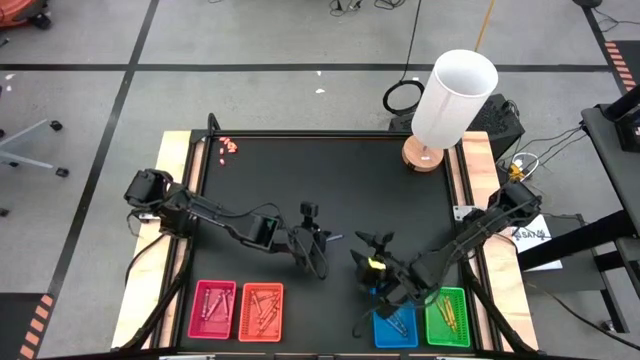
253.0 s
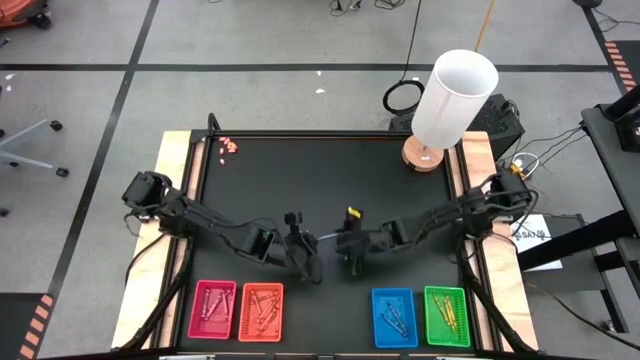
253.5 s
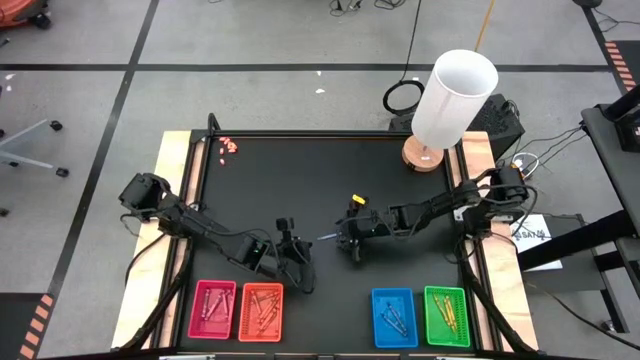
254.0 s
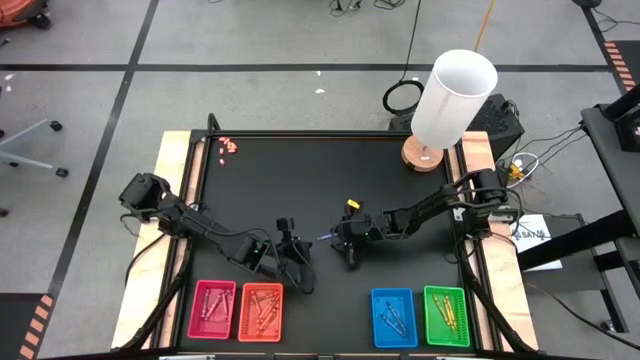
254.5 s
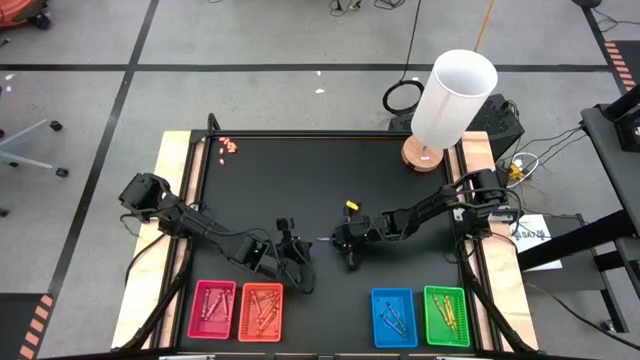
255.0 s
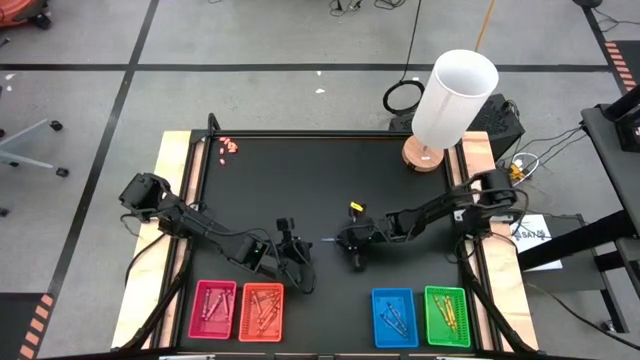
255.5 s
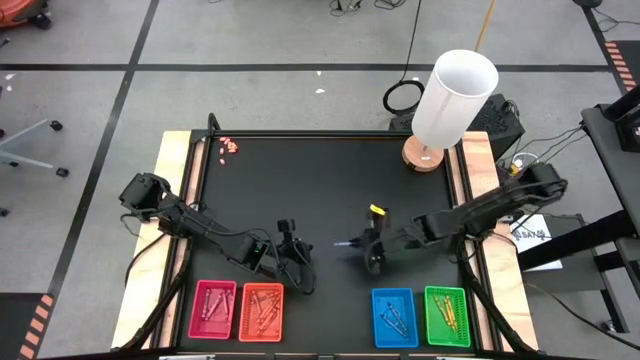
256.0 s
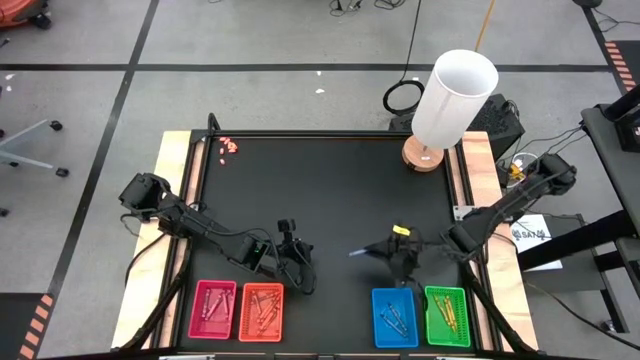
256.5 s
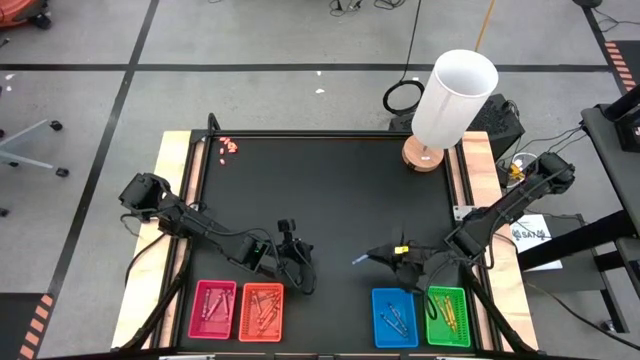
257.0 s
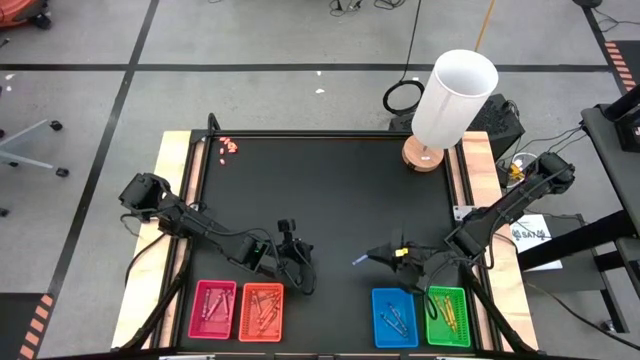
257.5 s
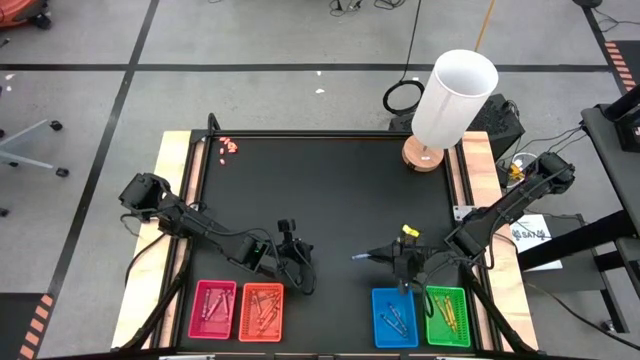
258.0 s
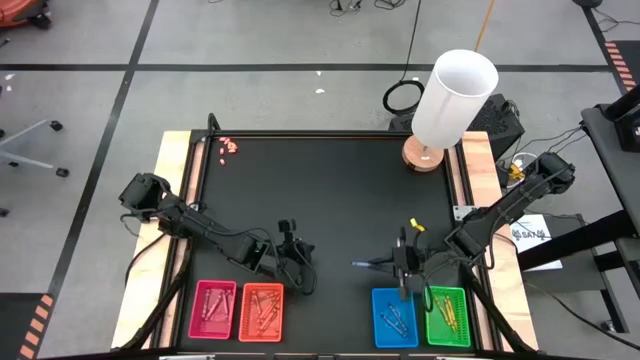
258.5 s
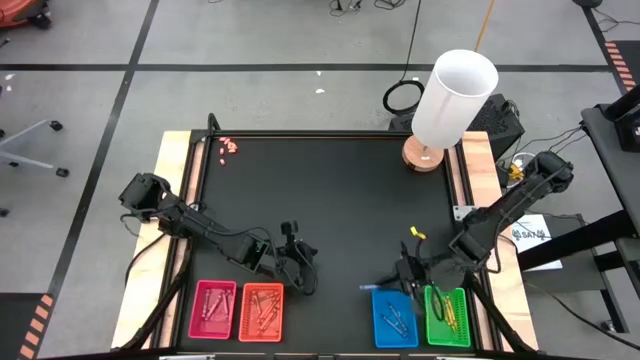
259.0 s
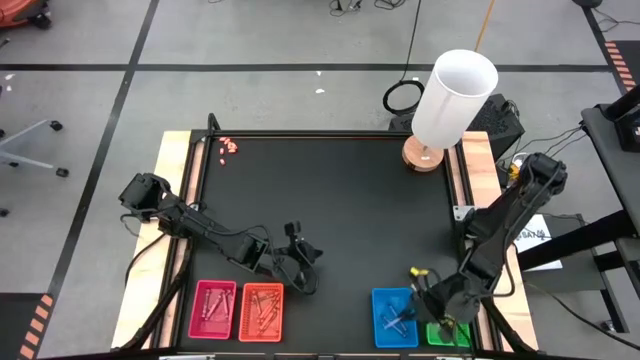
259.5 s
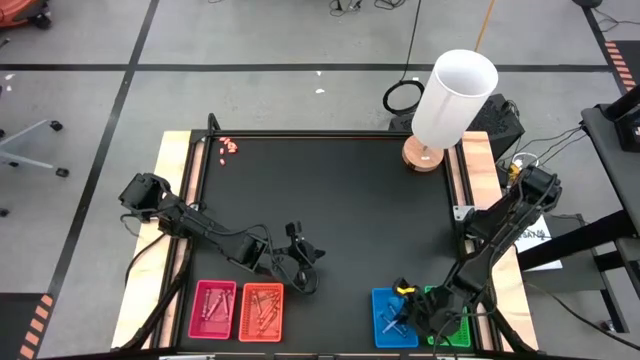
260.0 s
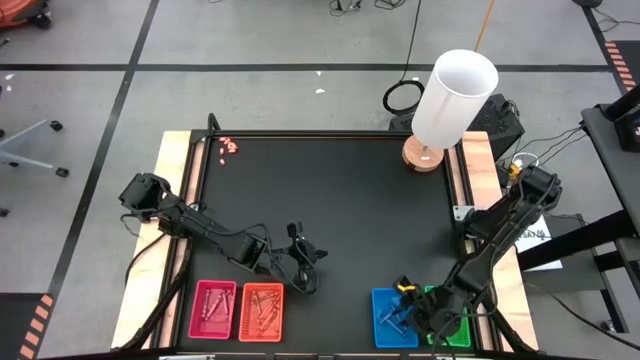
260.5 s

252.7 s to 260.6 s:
Task: Sort crayons
Put the blue crayon into the blue bin

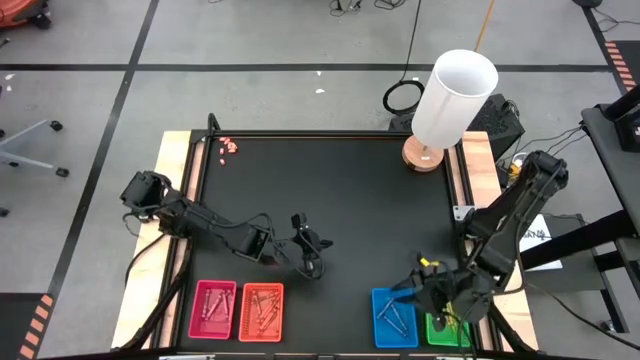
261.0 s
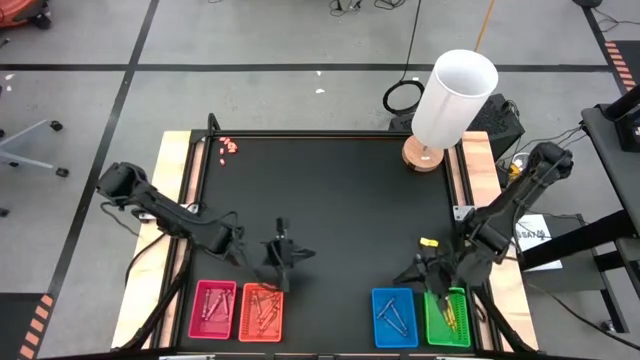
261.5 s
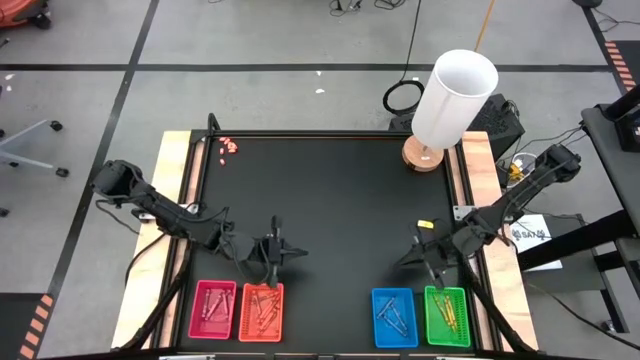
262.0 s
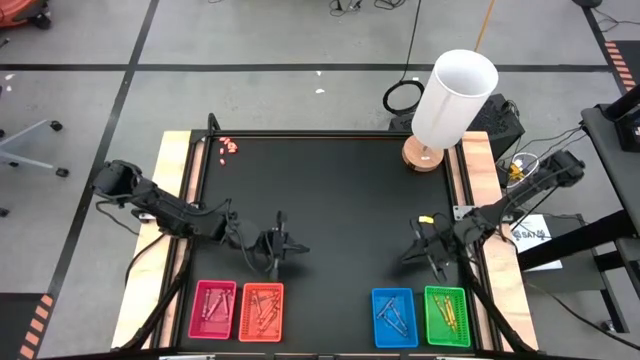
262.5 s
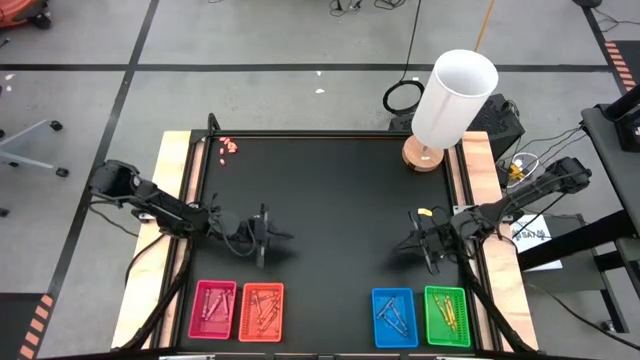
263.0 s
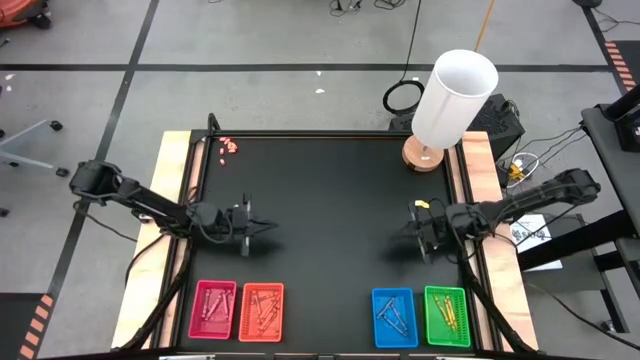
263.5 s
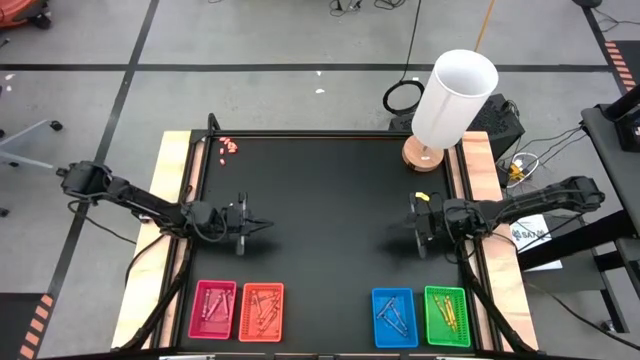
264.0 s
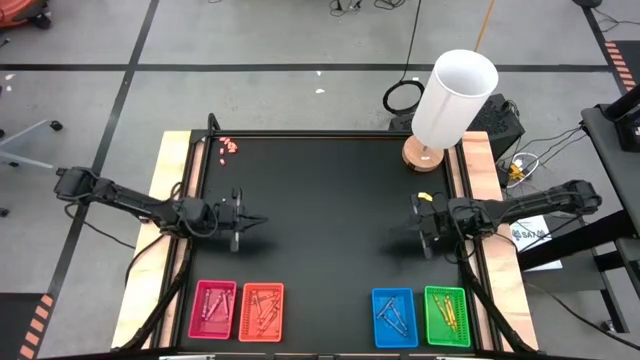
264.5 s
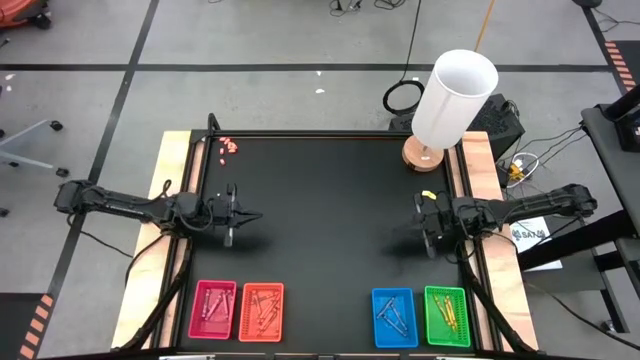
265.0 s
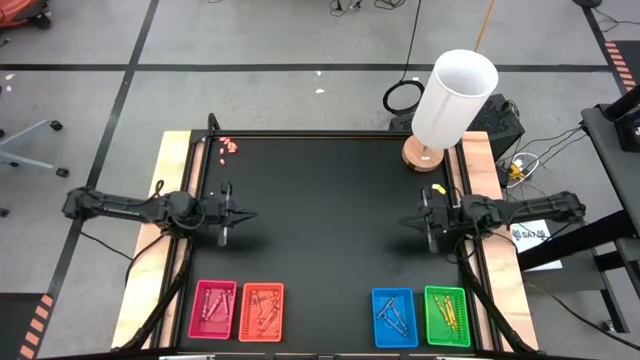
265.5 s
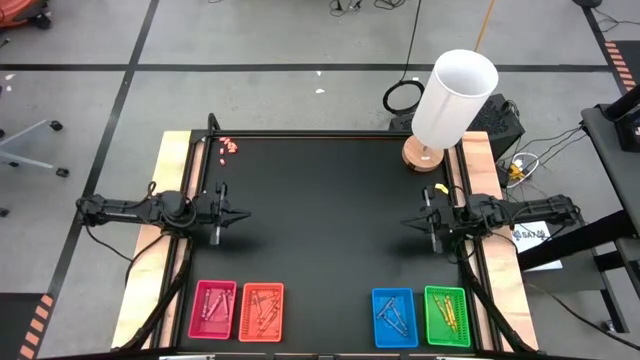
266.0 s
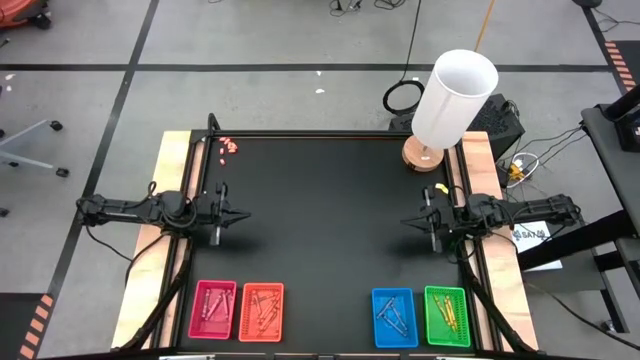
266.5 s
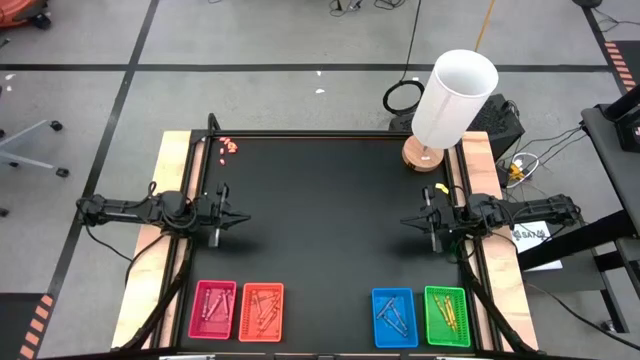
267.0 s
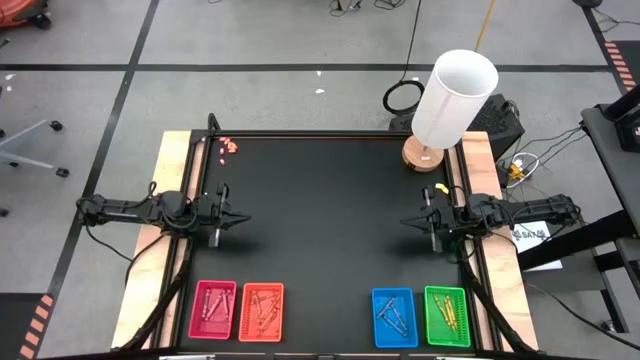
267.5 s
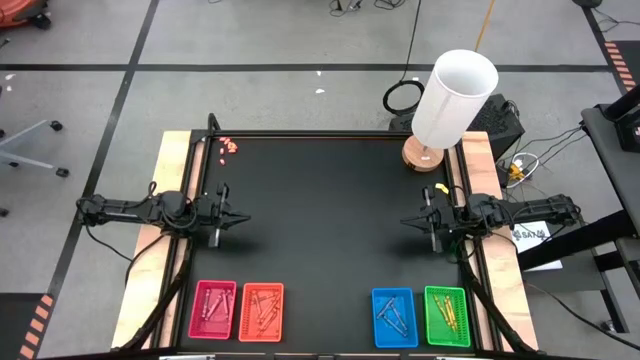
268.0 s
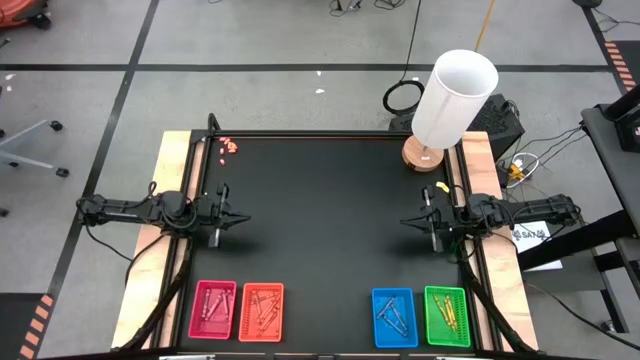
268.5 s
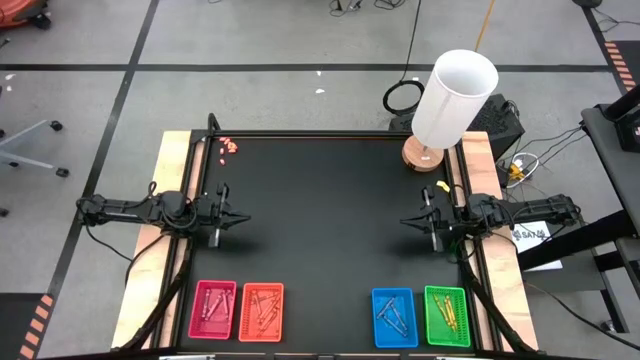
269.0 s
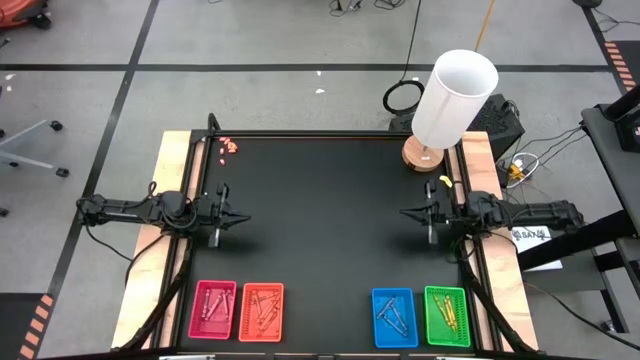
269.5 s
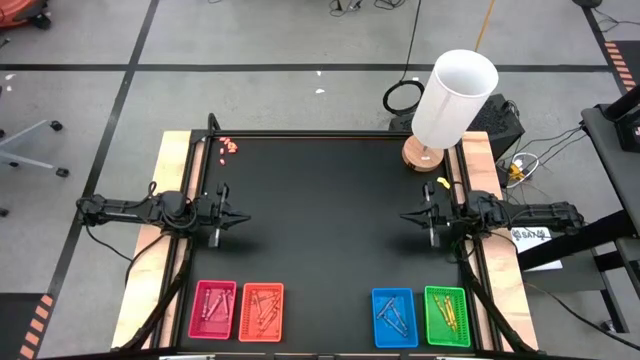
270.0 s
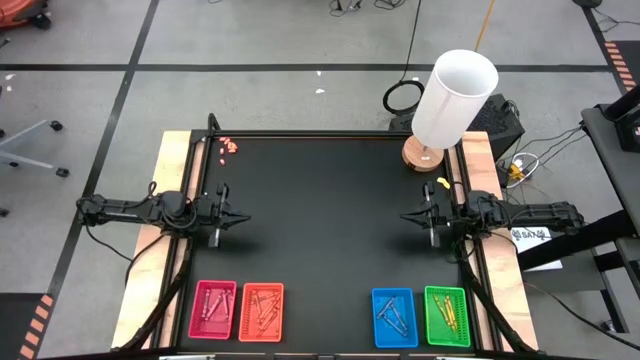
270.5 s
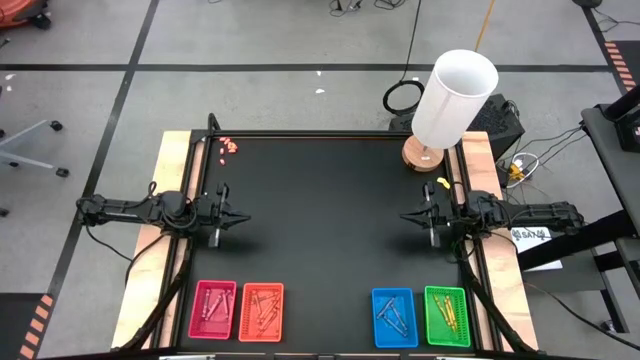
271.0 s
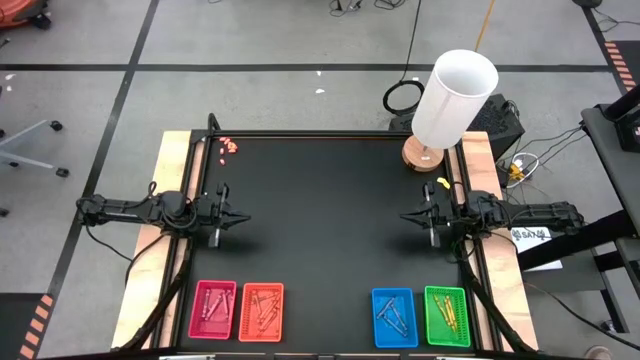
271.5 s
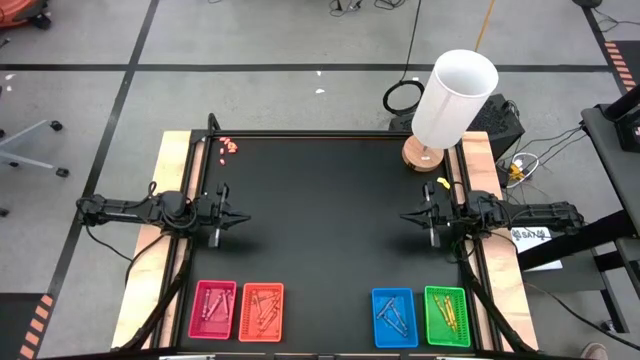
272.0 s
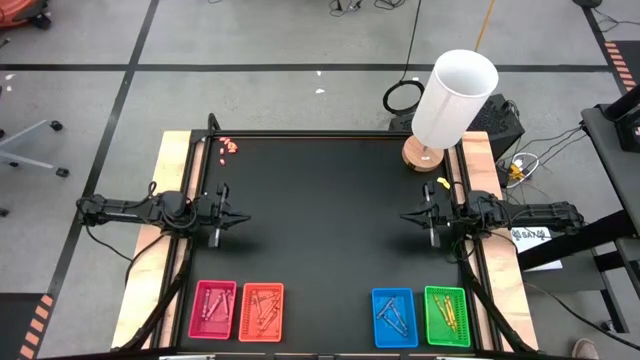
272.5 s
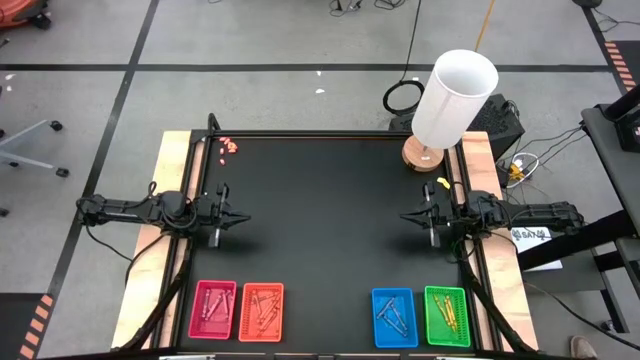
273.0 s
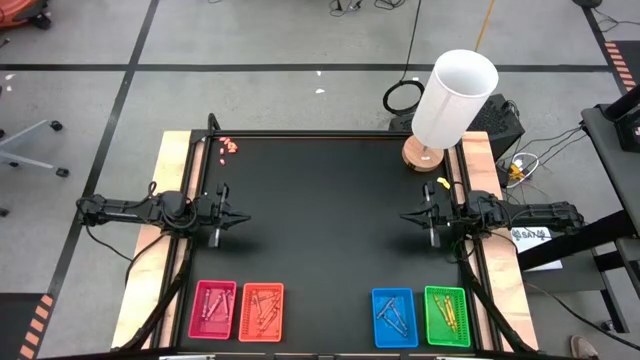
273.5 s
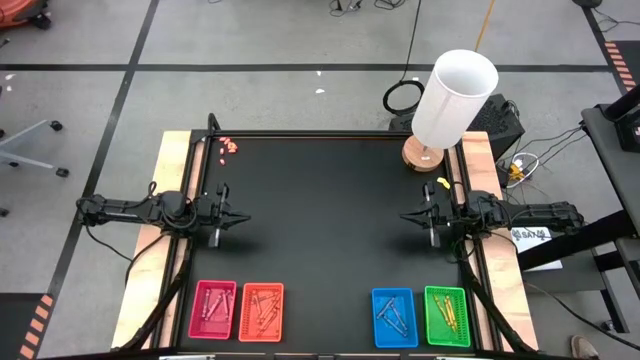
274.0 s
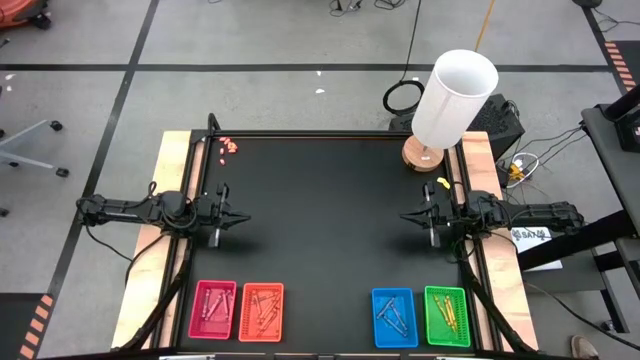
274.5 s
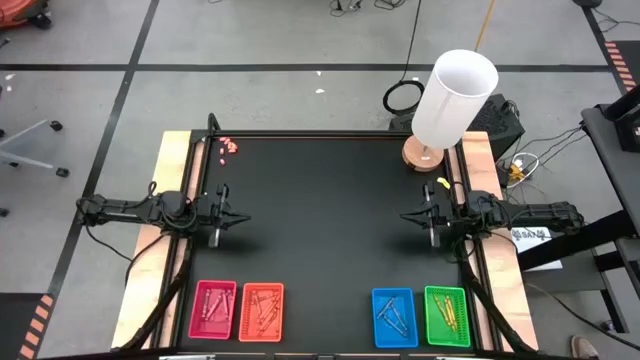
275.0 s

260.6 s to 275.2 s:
Return to Home Position
